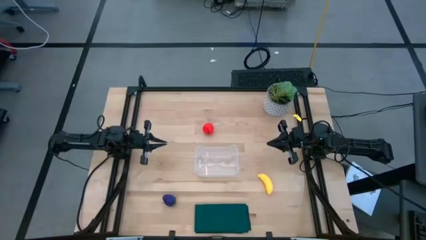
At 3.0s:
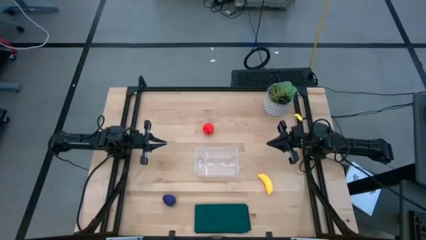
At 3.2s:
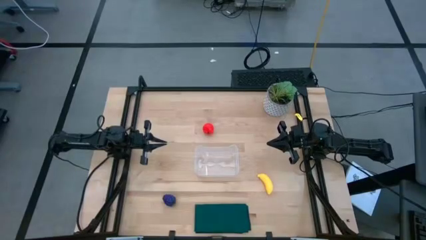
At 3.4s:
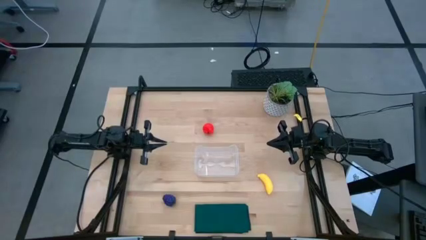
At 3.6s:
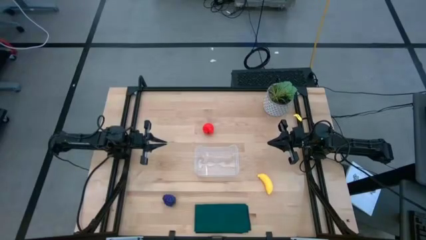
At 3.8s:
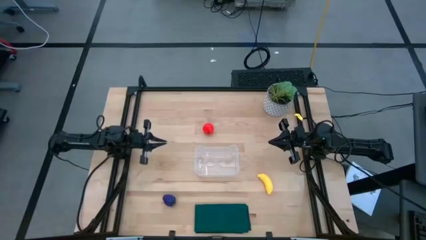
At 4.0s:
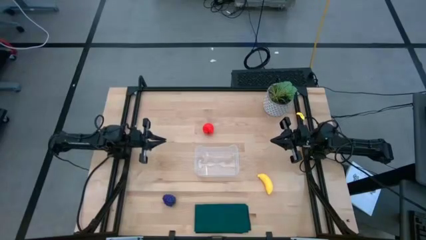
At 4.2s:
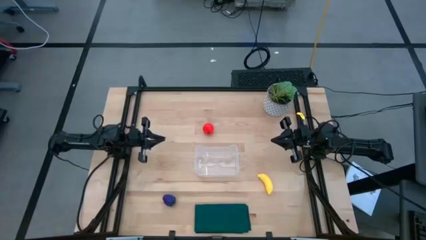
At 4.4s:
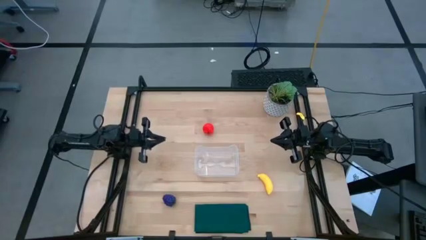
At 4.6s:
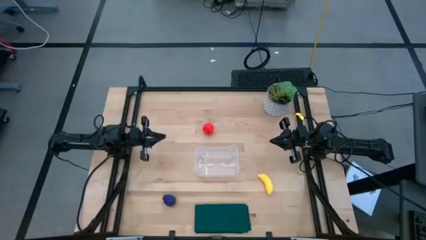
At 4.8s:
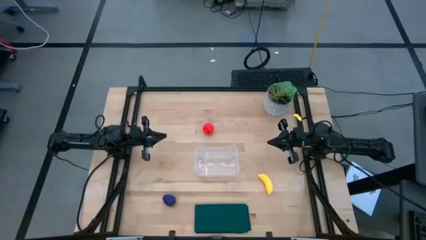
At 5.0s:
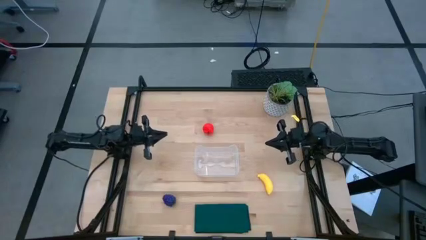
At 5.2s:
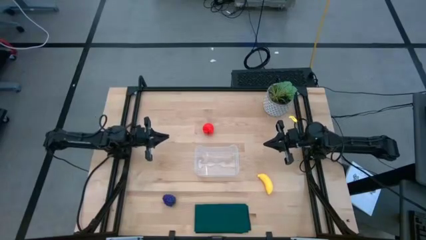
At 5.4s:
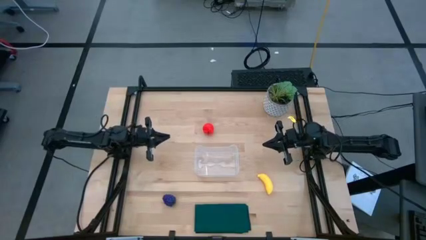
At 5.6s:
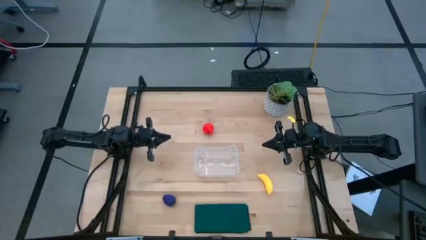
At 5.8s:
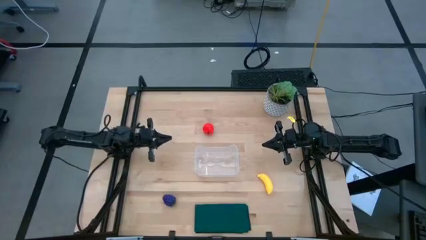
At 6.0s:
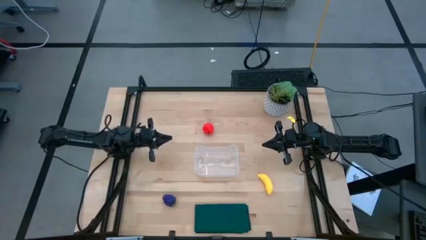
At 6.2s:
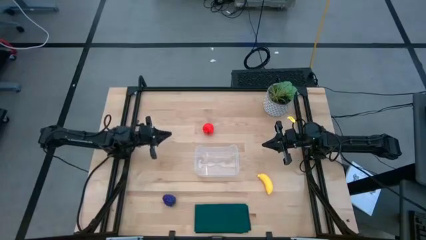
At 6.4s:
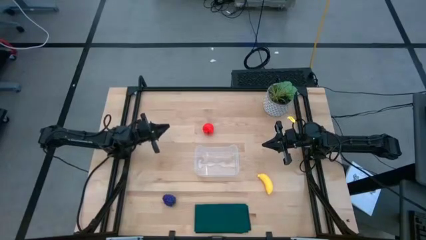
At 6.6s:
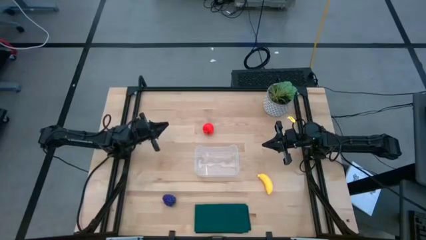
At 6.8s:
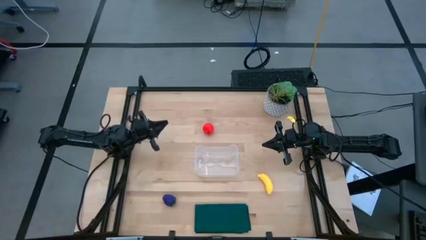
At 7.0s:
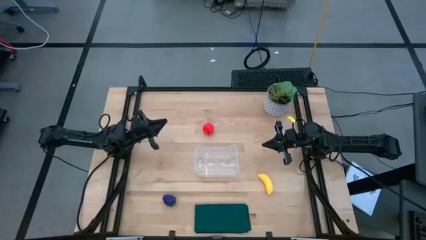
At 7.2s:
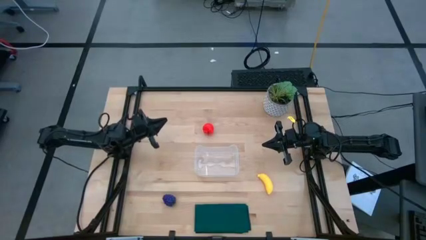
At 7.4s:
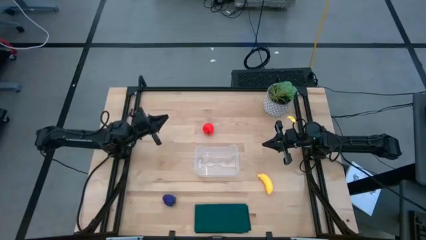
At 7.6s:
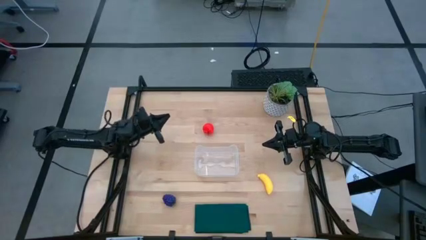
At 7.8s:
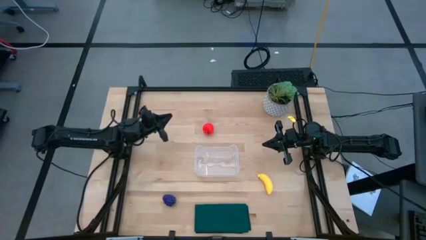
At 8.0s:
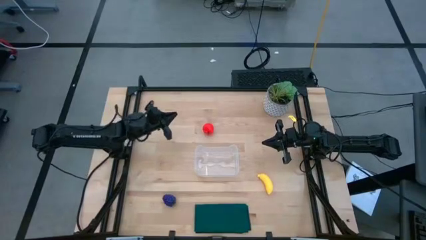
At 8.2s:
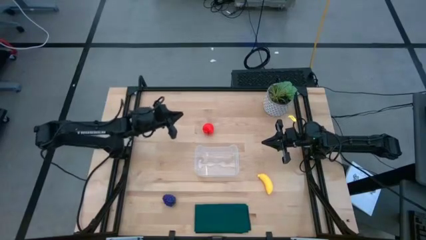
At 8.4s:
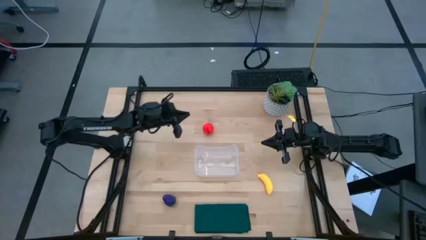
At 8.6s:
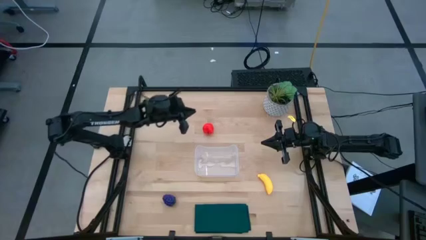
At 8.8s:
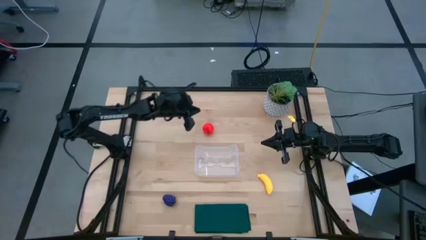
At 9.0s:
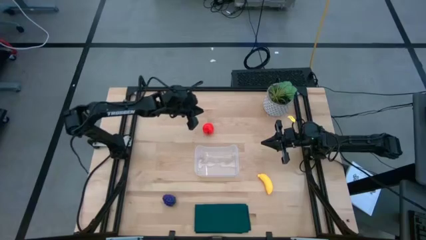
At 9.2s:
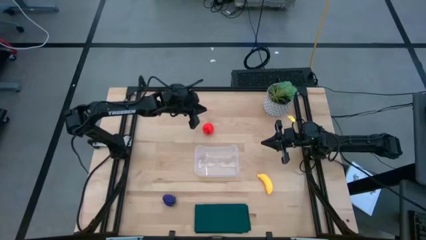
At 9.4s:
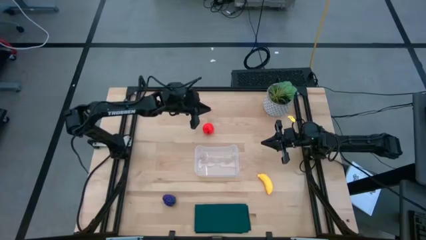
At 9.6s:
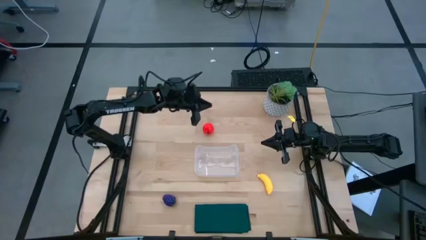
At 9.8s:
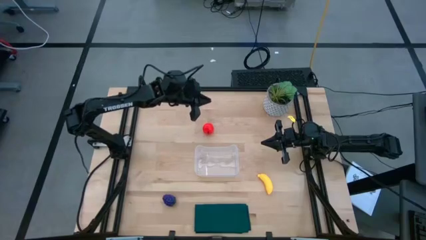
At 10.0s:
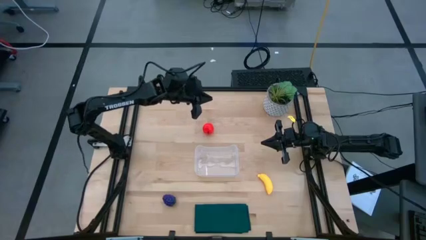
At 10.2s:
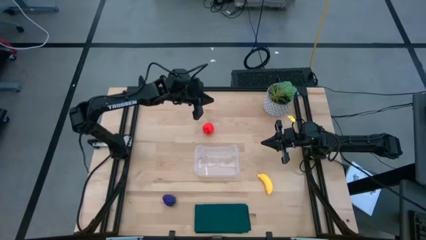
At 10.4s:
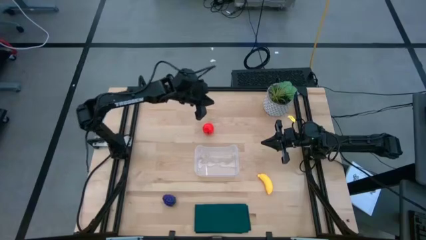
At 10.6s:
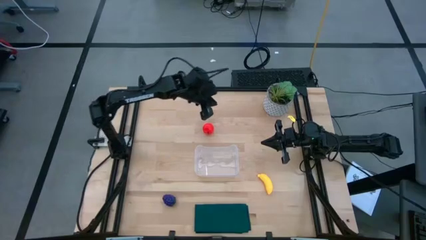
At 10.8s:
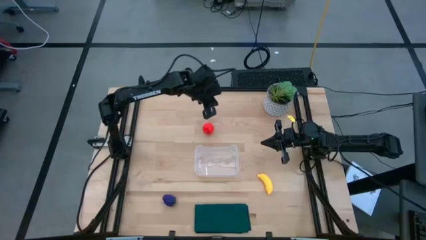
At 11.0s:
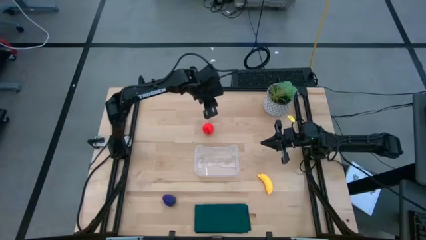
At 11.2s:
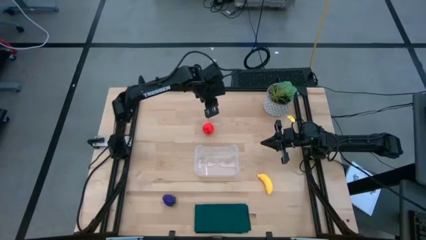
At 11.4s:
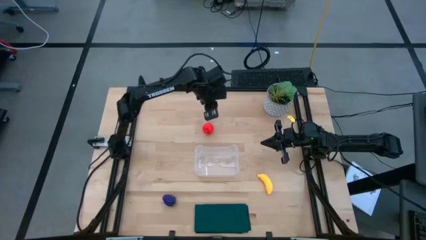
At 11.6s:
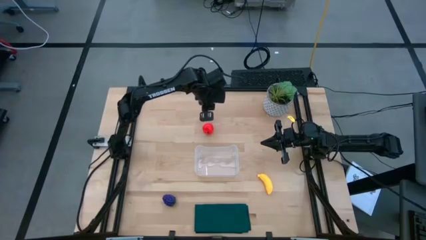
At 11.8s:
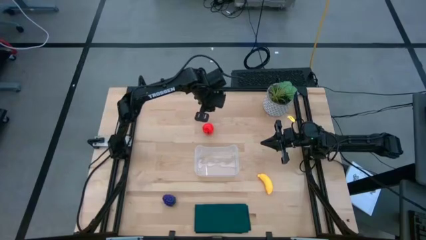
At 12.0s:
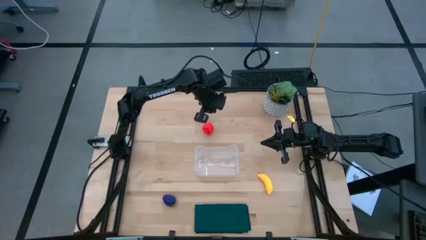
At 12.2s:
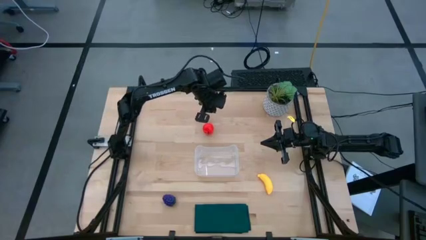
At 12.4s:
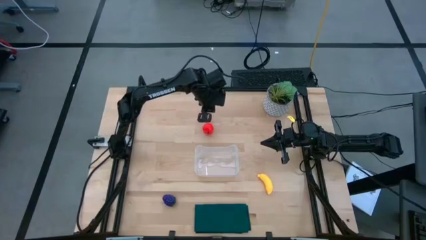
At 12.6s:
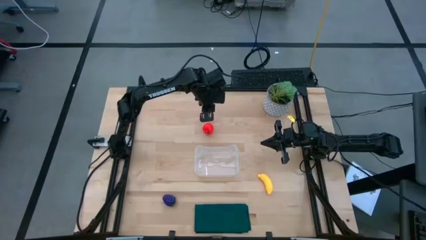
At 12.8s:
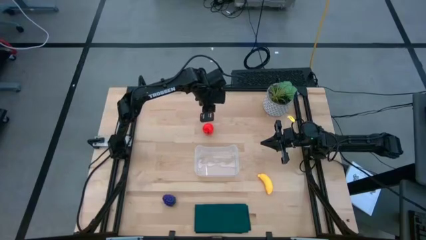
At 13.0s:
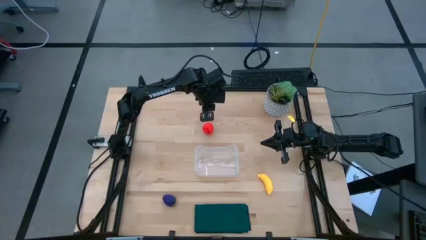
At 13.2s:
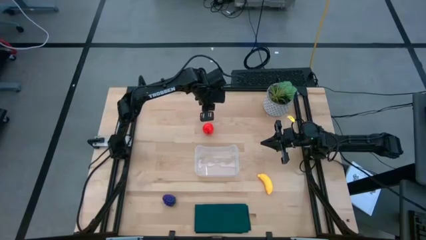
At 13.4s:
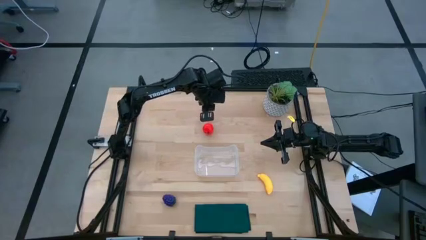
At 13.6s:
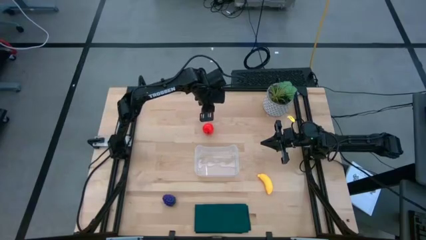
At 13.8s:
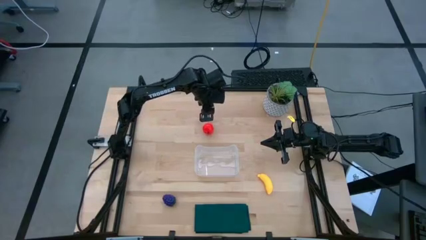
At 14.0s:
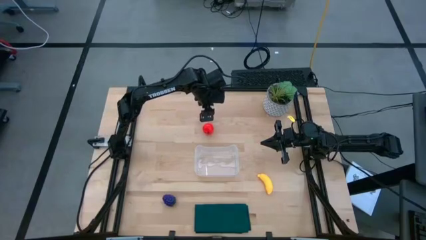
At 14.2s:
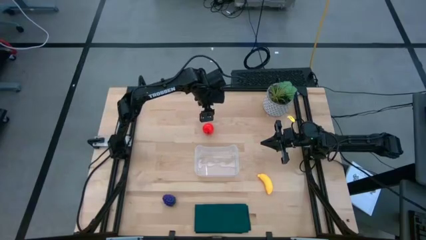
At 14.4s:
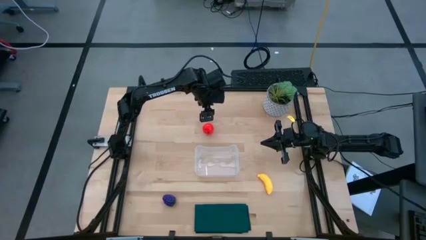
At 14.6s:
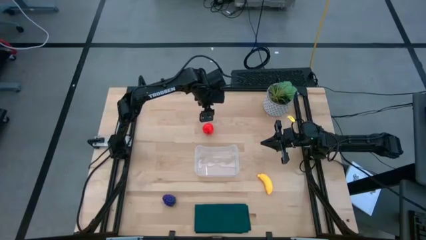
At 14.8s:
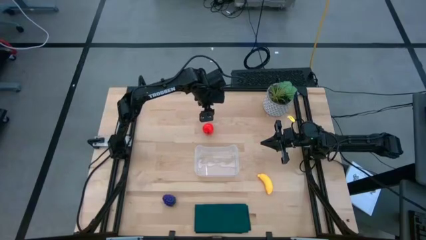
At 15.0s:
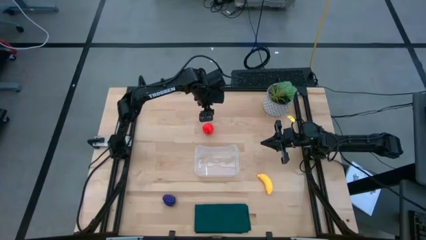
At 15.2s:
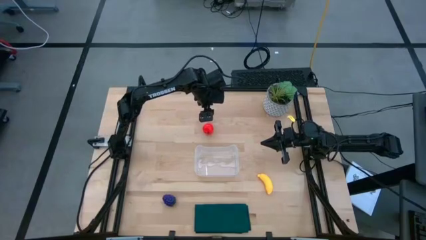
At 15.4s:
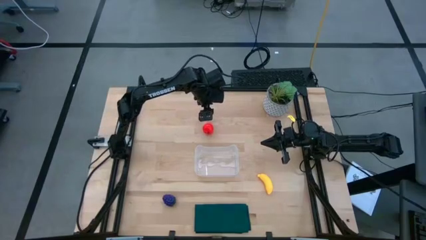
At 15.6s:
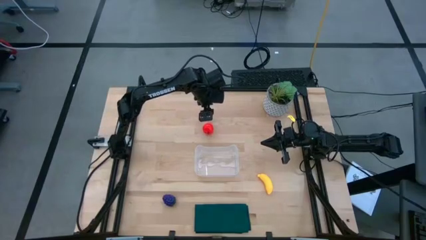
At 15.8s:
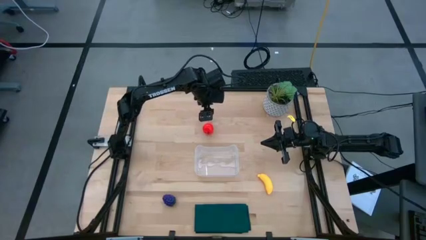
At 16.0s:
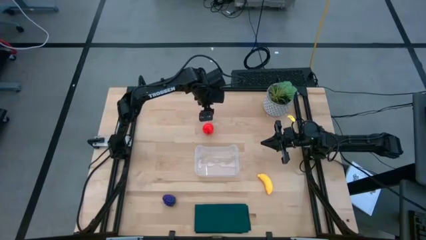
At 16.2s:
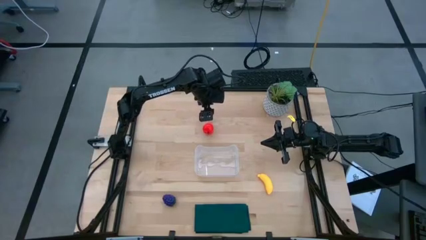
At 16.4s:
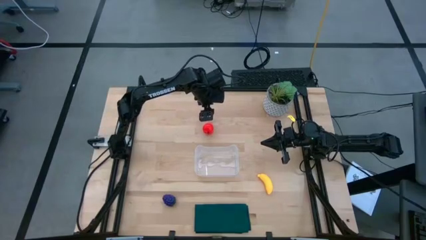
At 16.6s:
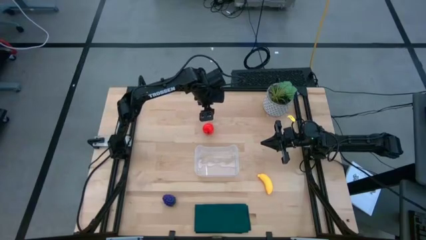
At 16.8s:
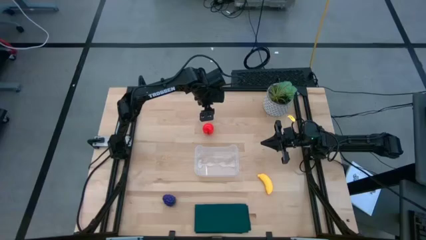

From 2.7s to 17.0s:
Task: Pick and placing Produce into tupperware
Put the red apple into the transparent bin

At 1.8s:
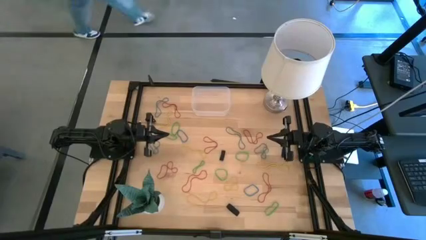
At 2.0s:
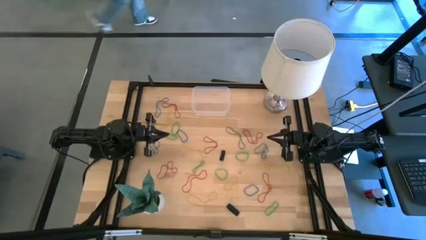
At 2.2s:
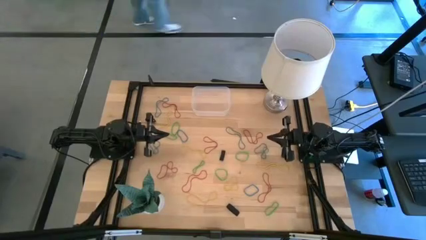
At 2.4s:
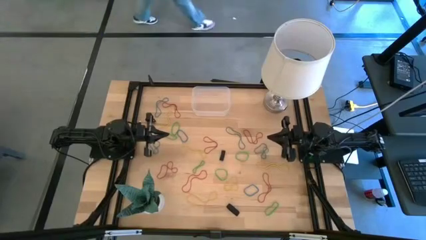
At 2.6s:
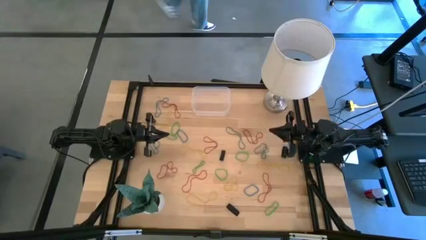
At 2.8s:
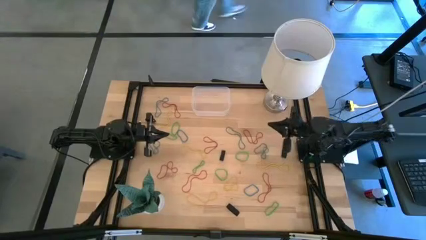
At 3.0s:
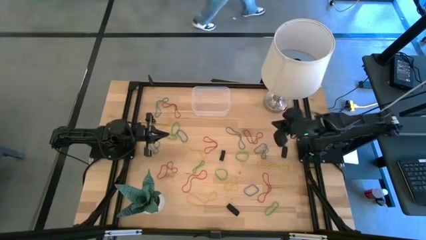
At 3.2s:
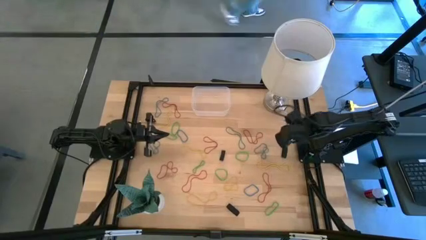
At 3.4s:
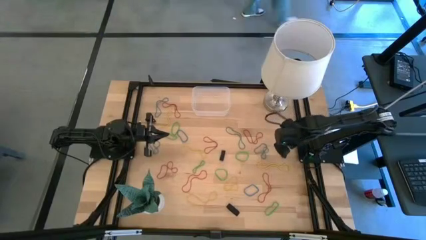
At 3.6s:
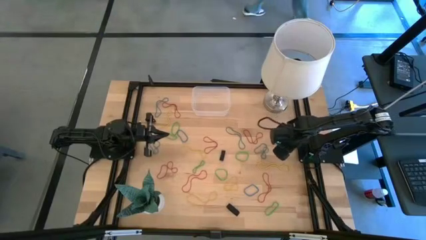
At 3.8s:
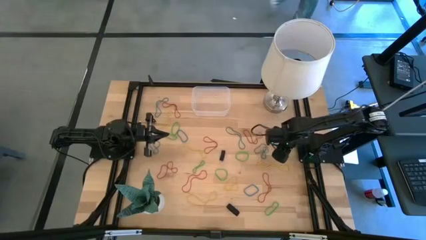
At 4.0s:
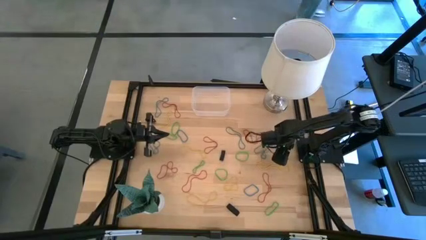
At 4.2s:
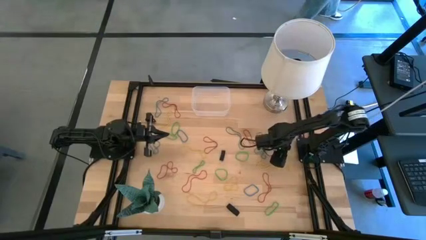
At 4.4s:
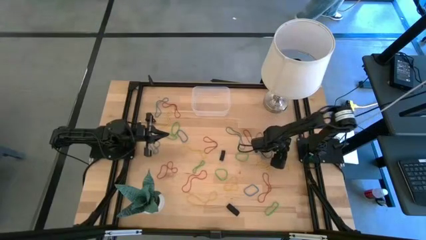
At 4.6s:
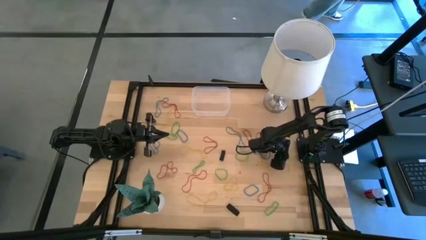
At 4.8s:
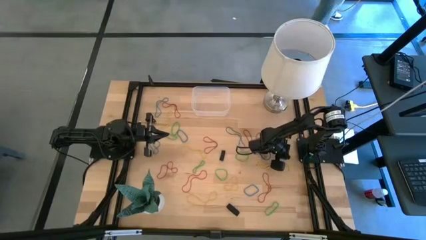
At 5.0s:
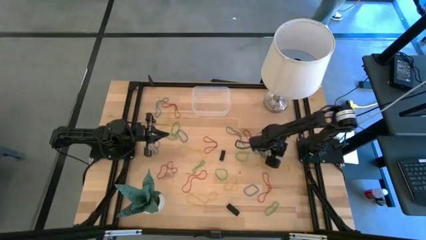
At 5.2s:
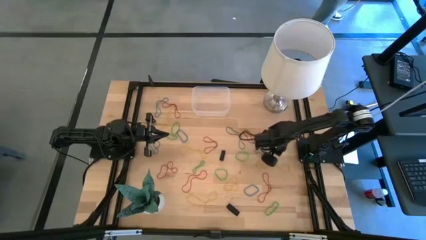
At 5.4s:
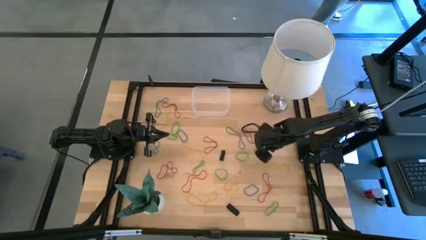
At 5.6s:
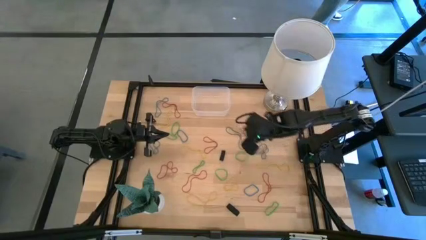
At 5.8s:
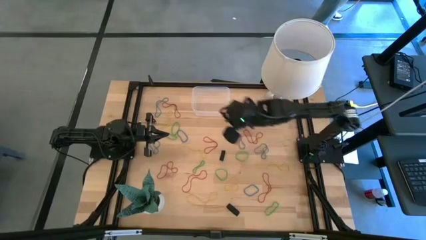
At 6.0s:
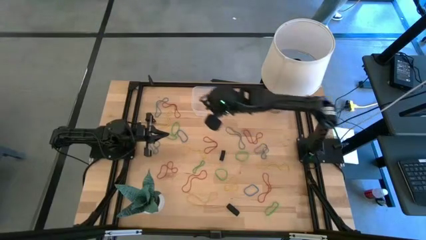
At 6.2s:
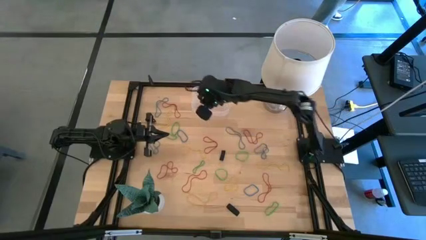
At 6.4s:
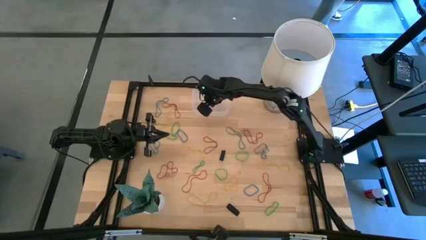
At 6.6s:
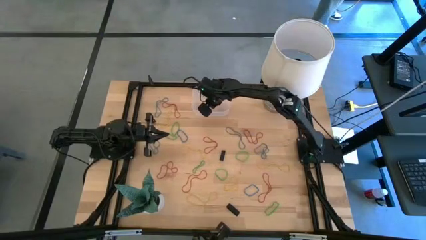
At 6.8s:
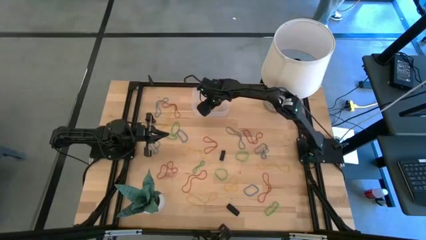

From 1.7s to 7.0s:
Task: Pick and place rubber bands into bin
Put the black rubber band into the transparent bin
